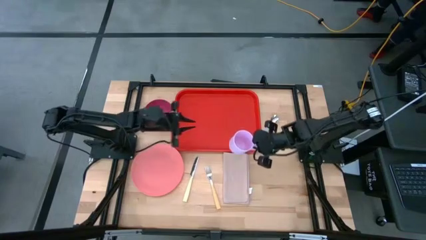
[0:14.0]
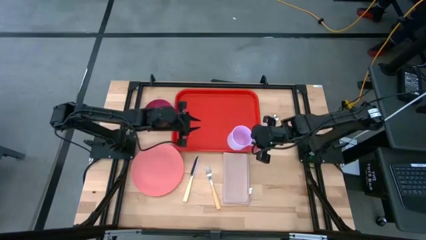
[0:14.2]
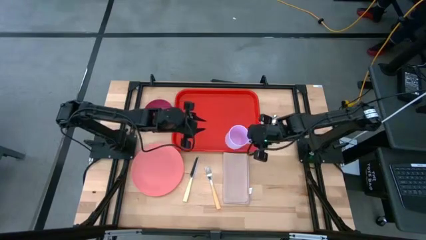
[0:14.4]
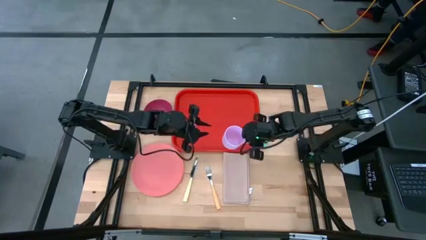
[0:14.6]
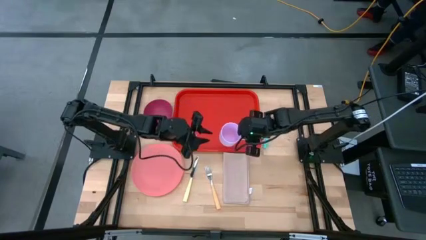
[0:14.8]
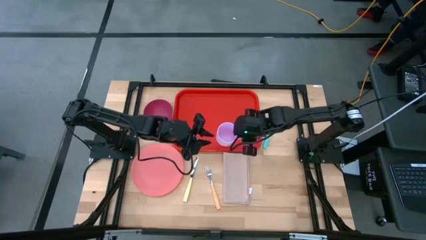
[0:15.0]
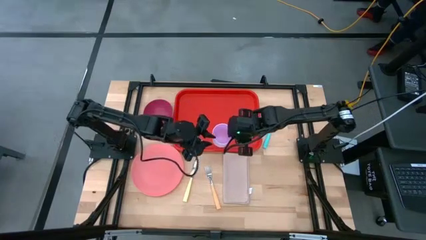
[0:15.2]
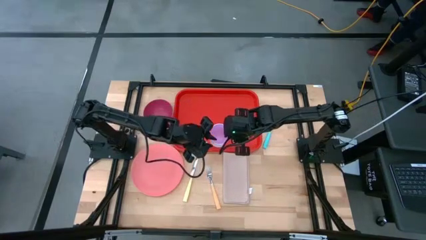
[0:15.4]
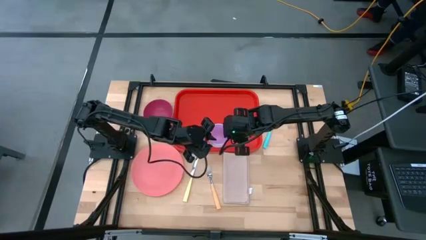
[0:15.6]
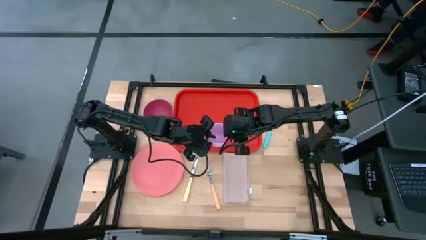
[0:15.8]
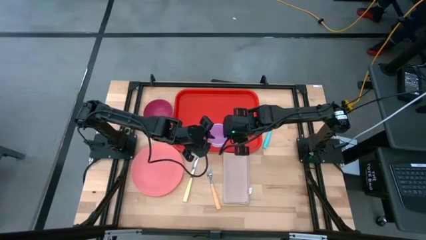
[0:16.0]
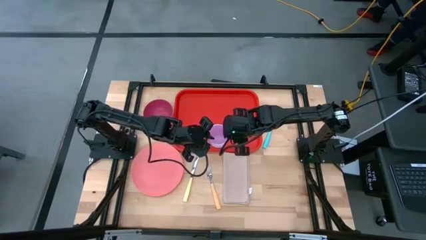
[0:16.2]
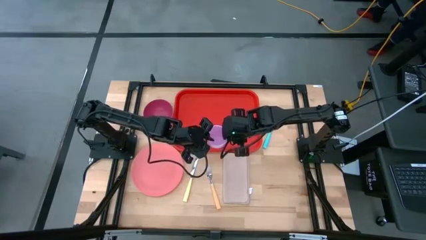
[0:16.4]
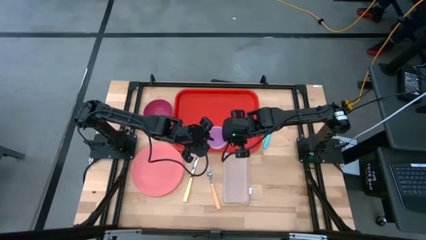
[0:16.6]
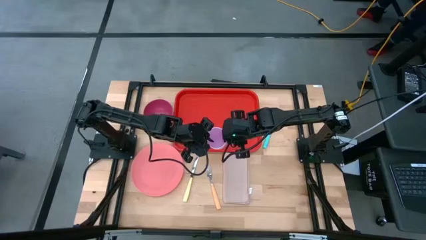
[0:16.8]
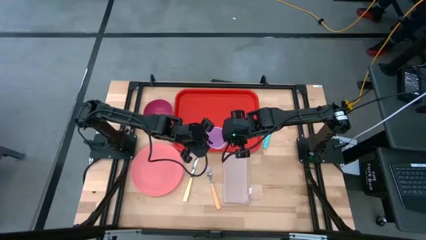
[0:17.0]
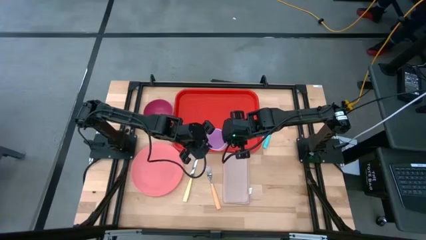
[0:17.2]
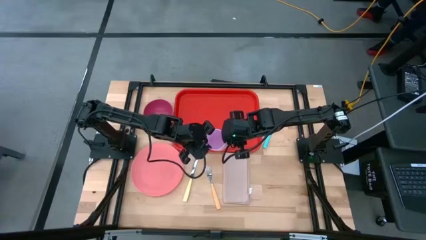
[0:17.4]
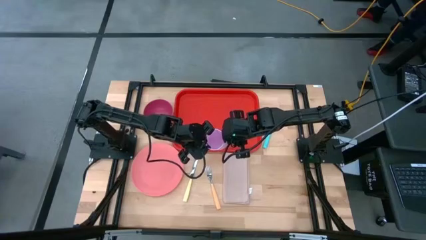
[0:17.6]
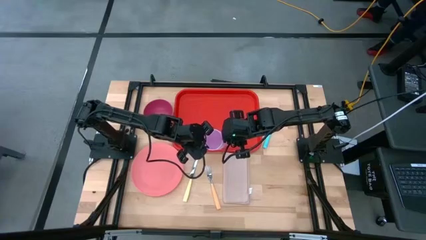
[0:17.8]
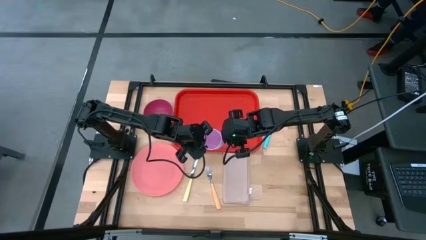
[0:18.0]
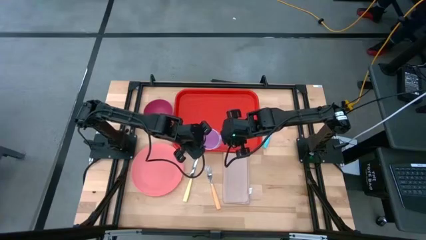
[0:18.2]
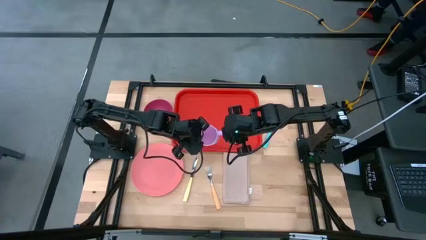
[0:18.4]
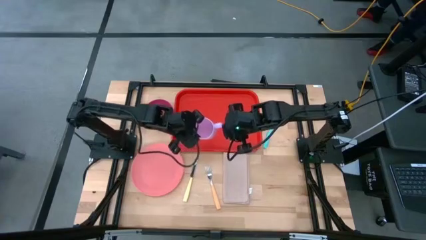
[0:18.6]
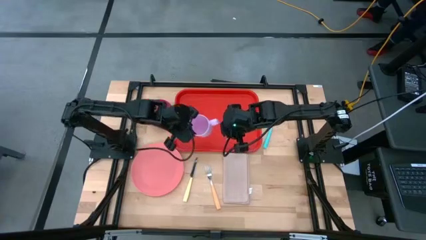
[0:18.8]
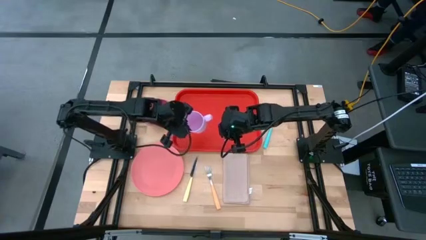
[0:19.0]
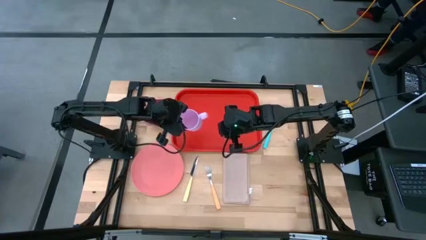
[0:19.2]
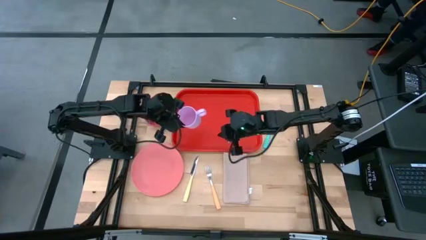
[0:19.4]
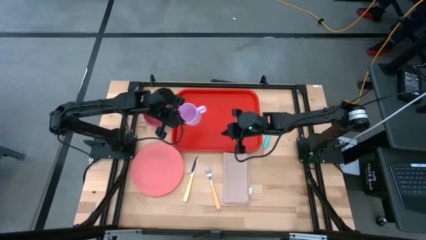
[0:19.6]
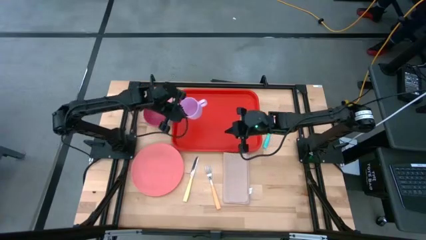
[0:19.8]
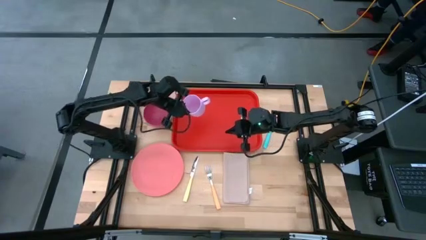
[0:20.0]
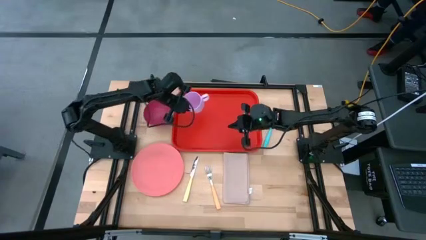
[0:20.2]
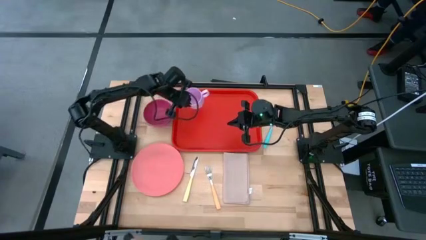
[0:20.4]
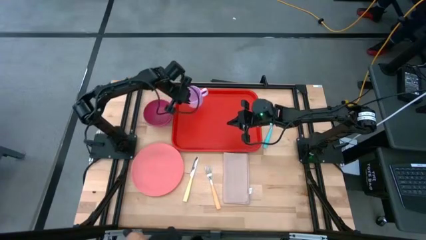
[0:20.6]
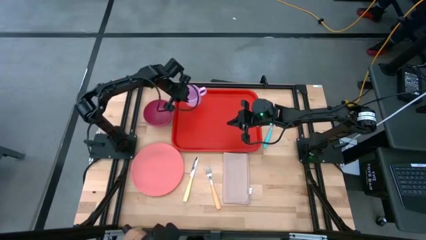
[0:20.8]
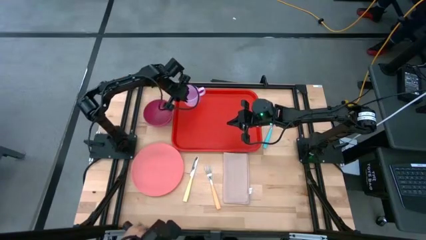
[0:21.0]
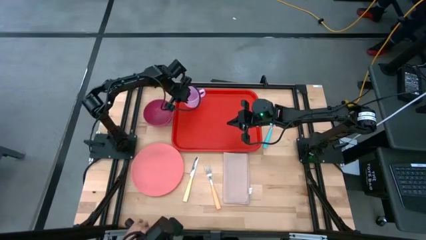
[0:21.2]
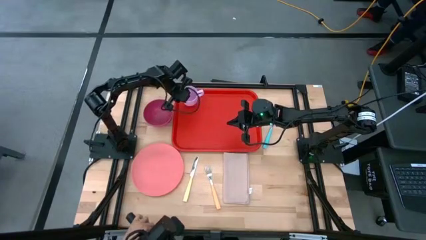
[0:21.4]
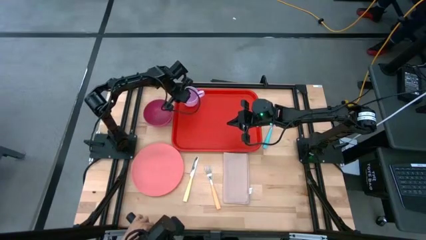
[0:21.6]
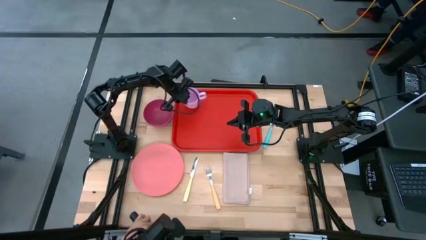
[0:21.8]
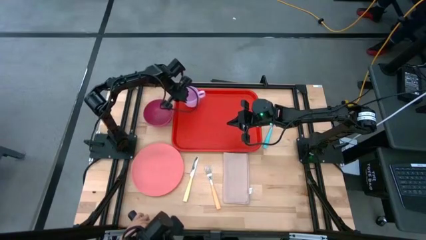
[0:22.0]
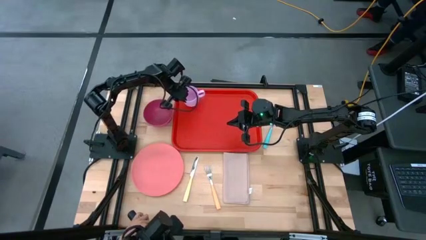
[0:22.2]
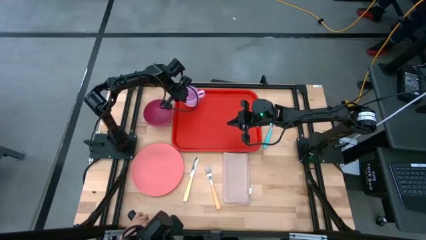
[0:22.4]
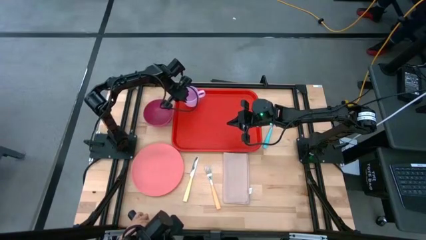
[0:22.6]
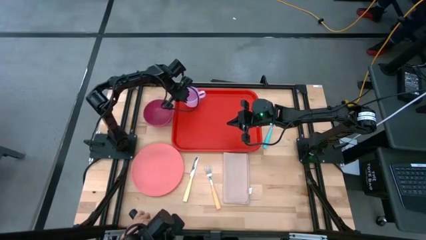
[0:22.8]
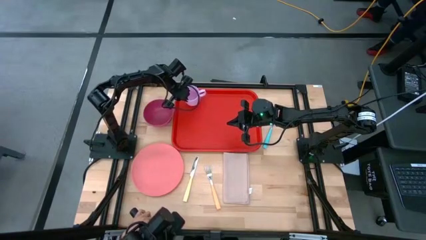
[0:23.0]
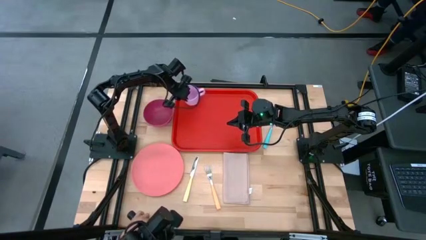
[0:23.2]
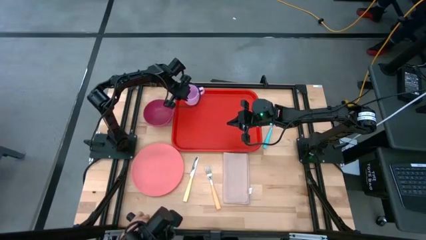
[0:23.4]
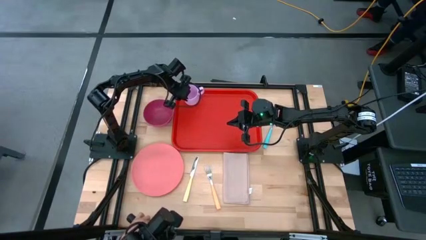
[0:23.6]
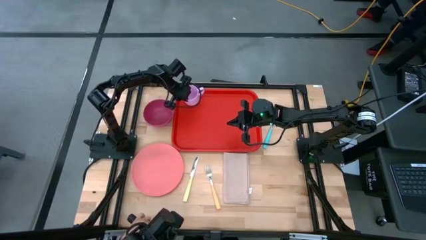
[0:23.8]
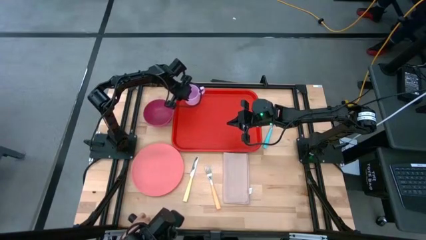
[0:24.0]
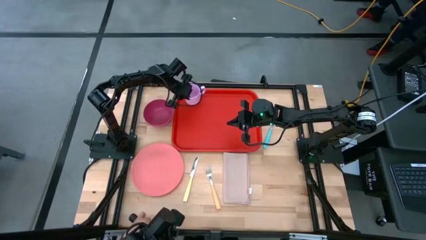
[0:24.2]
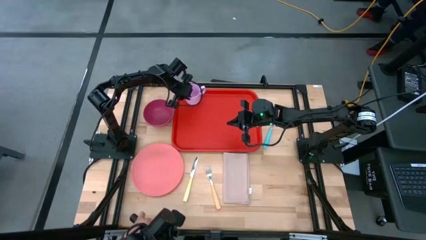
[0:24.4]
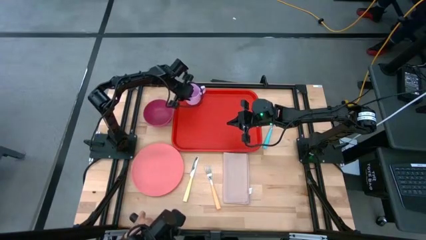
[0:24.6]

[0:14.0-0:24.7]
Task: Set up tray
Put the purple mug on the top left of the orange tray

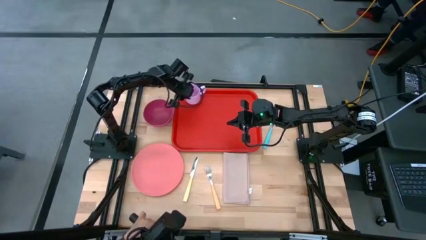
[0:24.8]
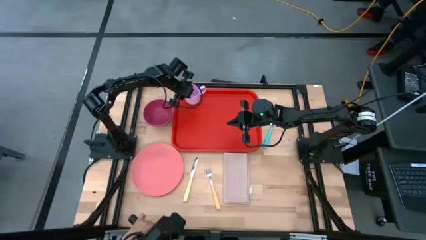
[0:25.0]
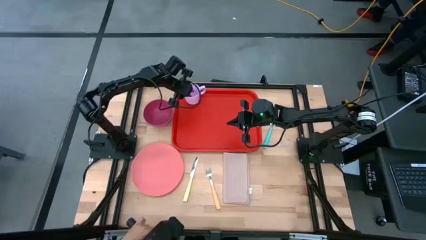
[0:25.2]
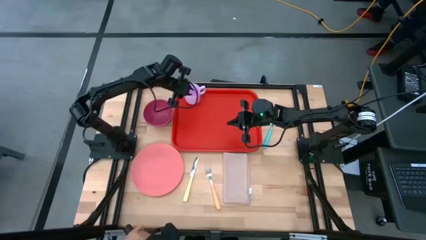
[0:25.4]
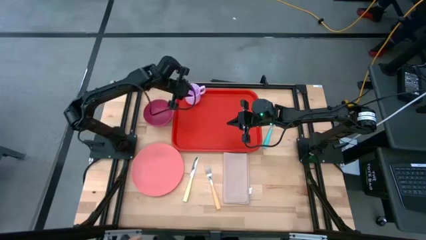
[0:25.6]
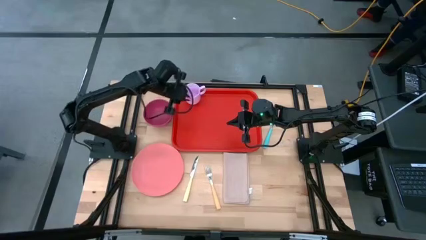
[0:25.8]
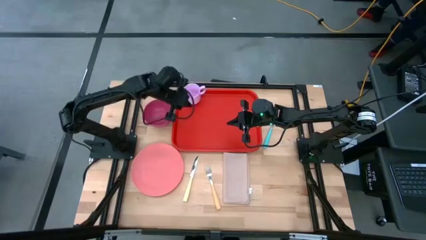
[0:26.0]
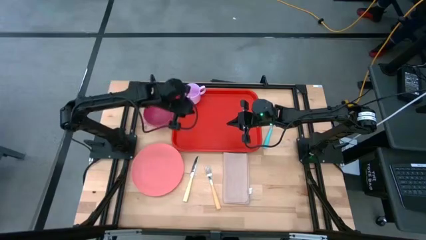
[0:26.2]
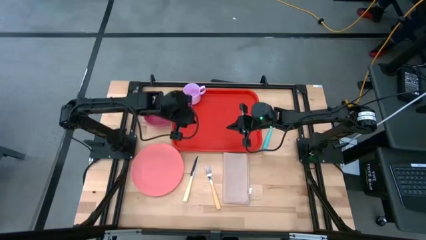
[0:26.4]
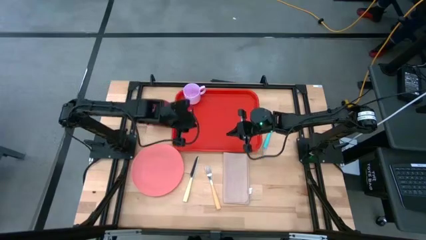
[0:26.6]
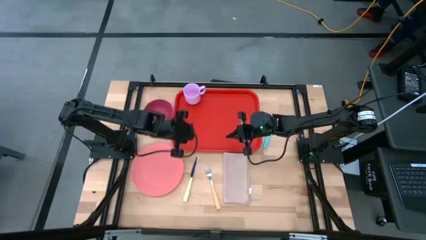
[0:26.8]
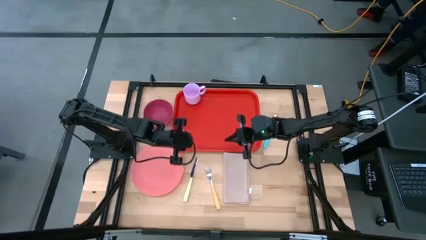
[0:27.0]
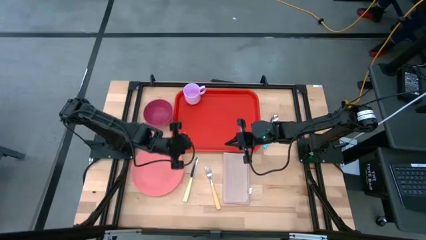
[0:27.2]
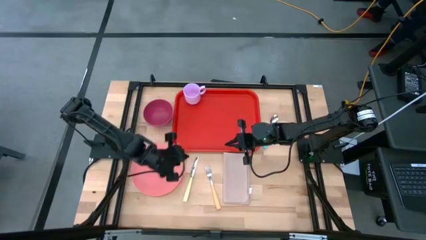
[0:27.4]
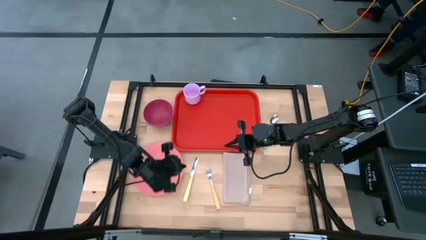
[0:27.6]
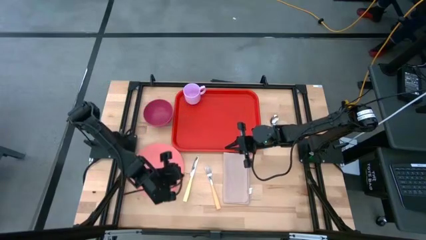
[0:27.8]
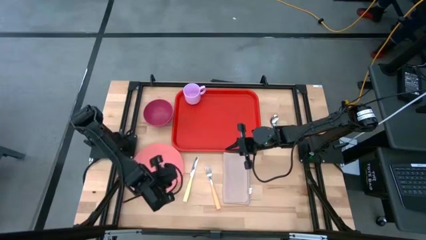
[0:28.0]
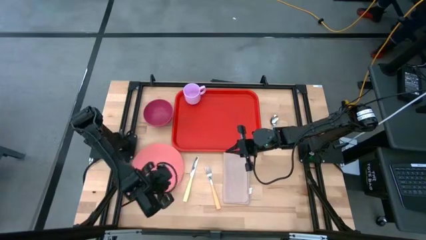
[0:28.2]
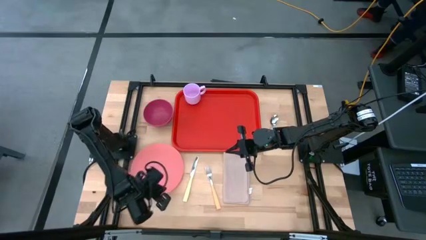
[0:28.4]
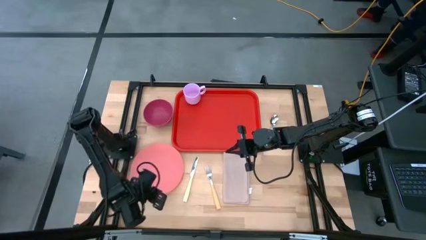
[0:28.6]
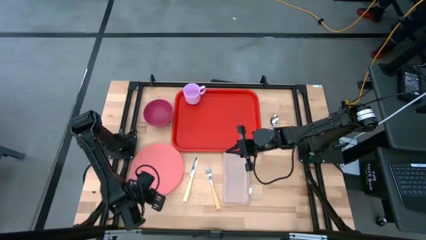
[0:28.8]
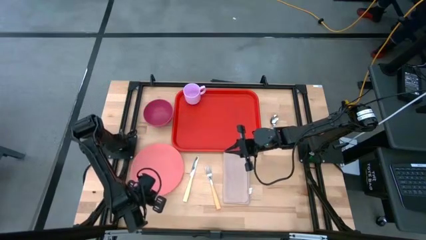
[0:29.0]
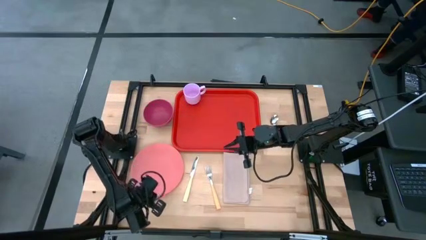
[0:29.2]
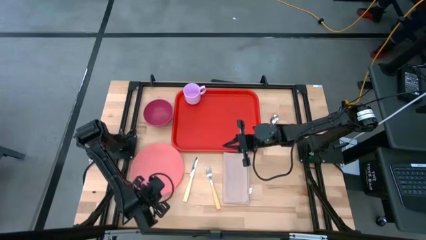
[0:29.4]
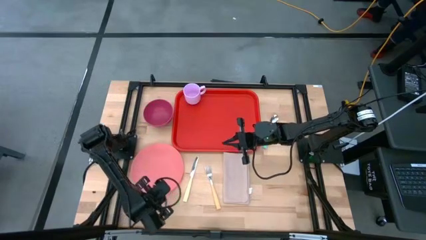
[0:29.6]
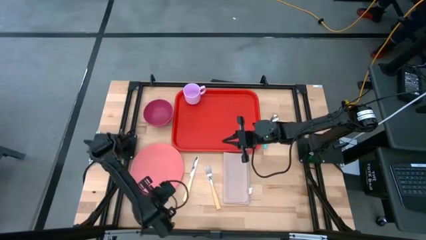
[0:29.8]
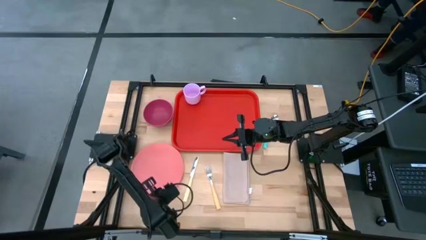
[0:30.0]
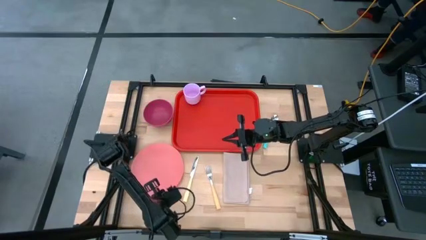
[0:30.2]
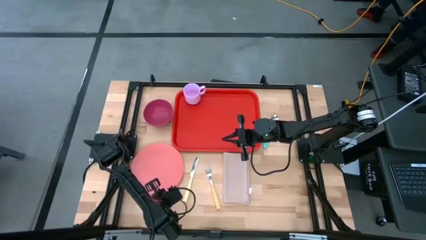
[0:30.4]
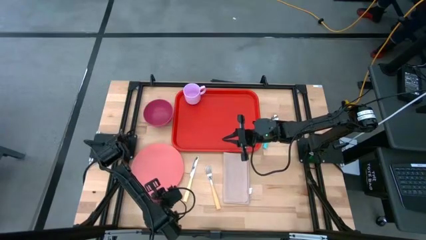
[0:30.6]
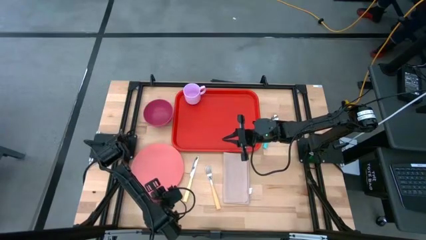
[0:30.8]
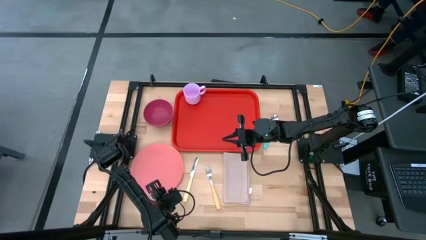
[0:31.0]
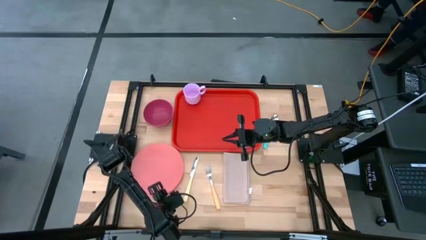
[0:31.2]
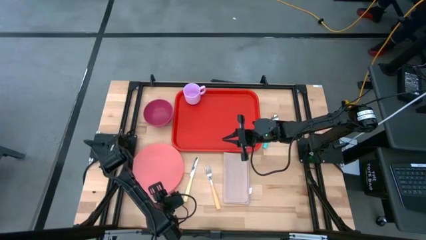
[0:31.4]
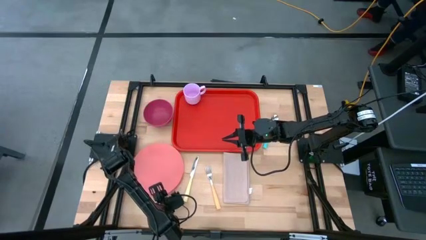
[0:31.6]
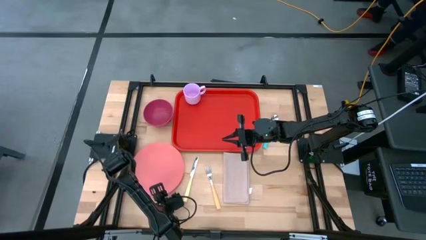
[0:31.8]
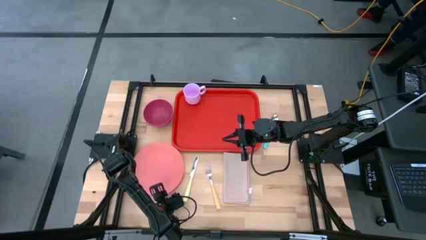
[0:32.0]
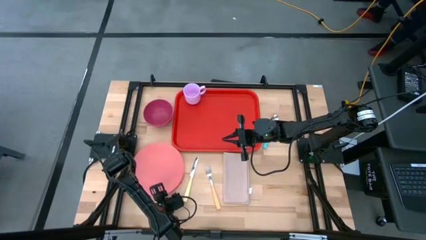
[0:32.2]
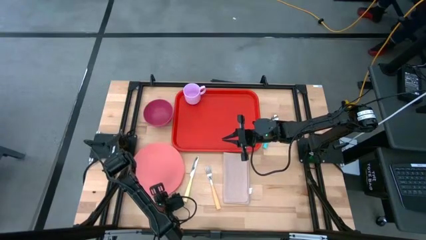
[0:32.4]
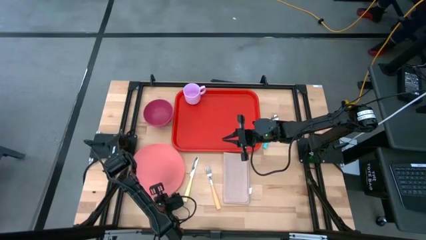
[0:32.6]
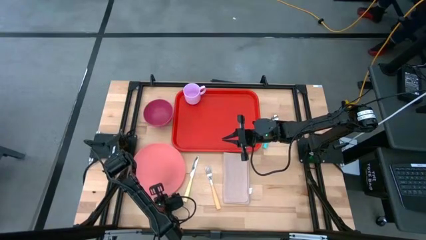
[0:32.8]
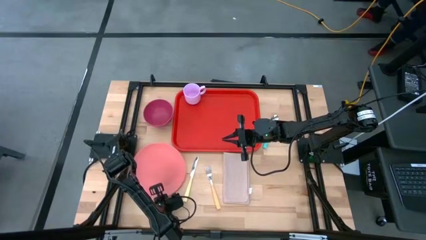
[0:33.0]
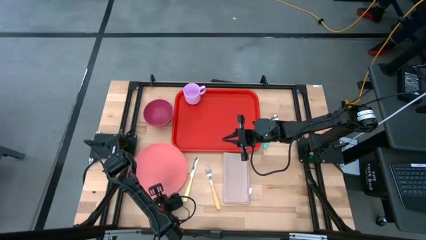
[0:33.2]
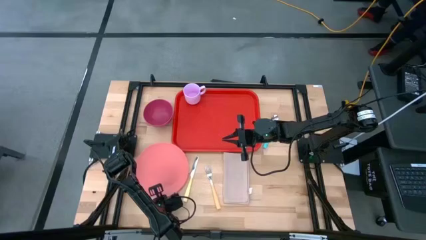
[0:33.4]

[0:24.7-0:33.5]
Put the pink plate on the bottom left of the orange tray
